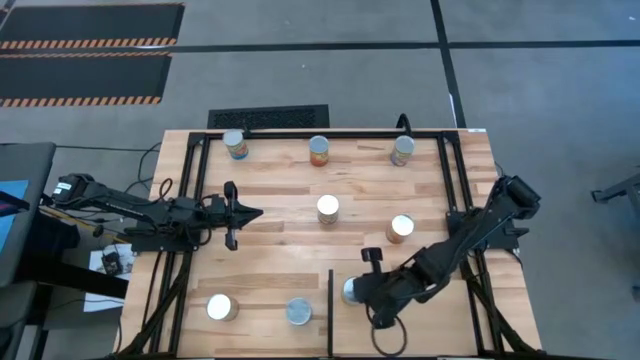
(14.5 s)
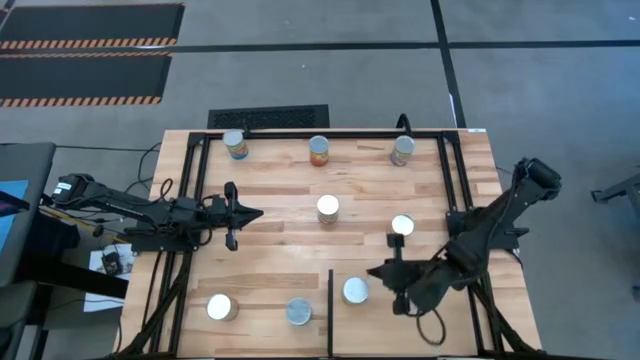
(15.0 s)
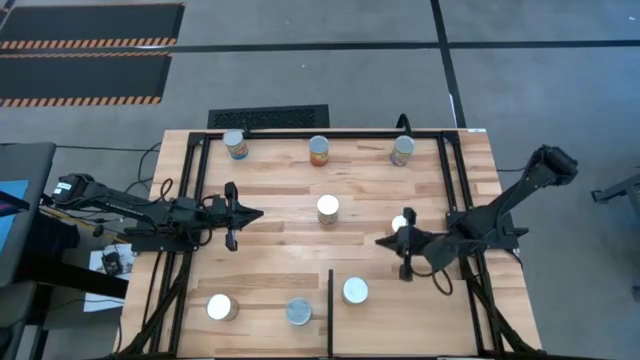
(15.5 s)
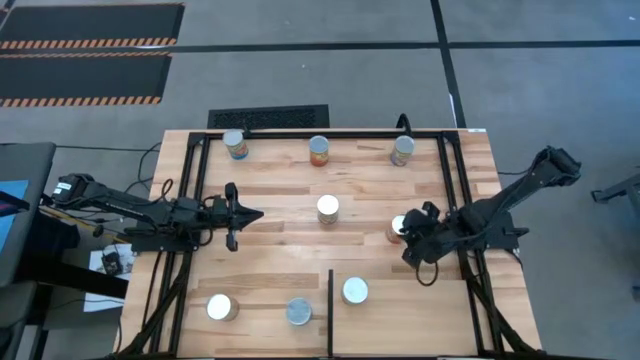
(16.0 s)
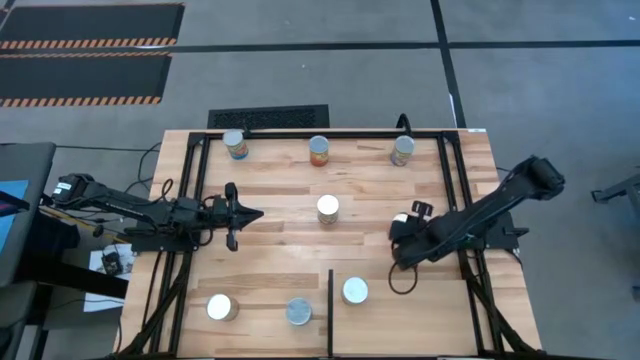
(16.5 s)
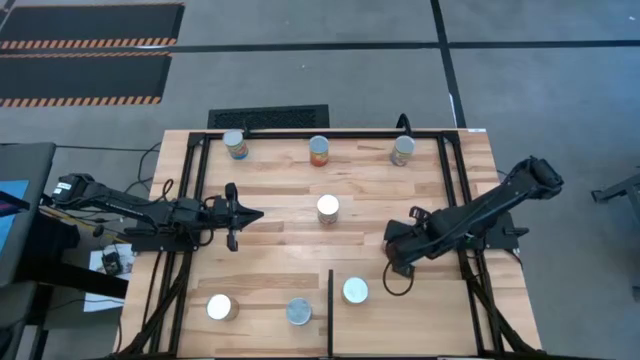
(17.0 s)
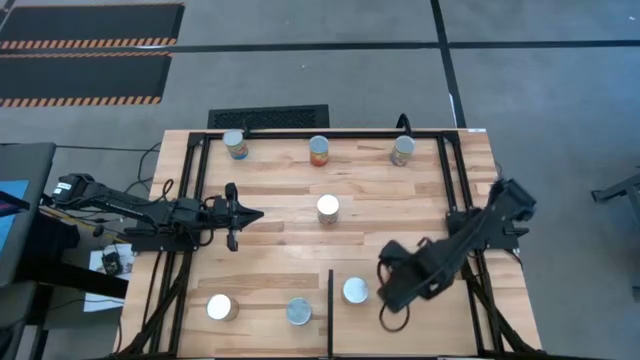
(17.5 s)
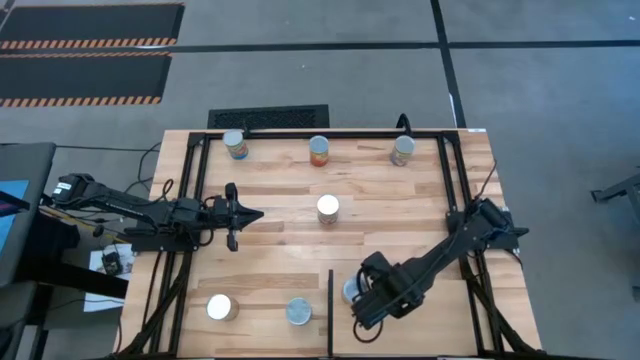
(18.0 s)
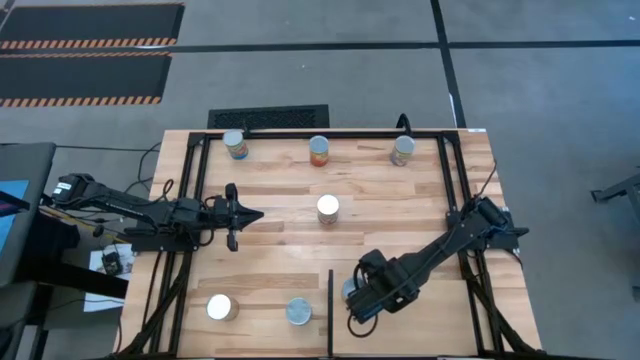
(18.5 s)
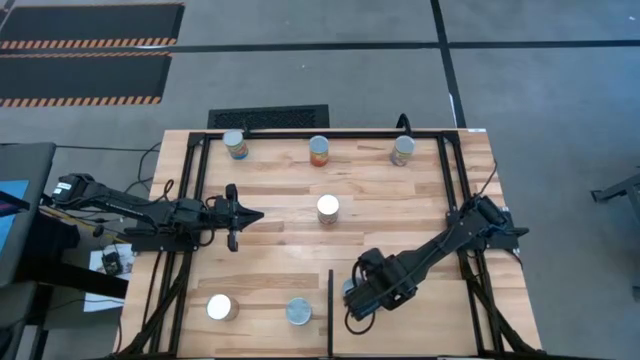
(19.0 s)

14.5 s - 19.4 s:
Task: Pick and place cans onto a shelf
Put the bottom canned corn on the shelf

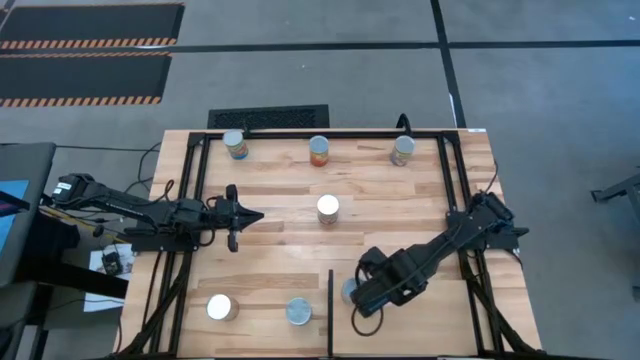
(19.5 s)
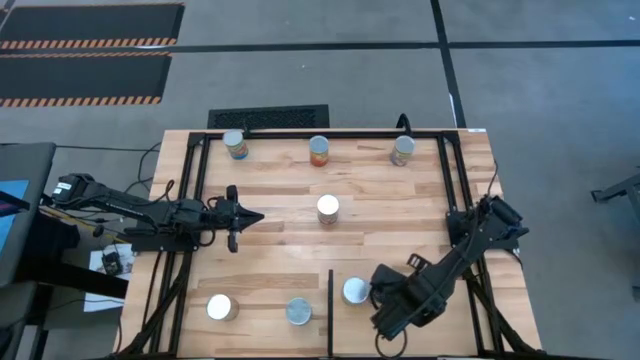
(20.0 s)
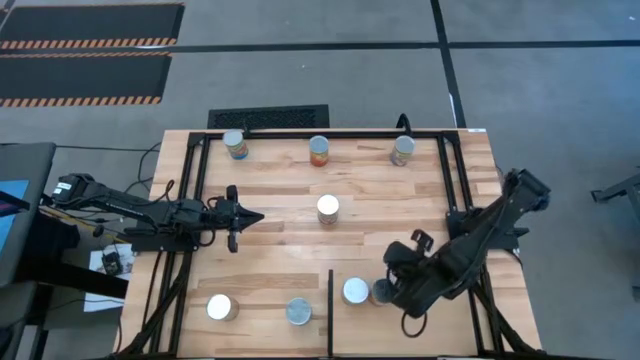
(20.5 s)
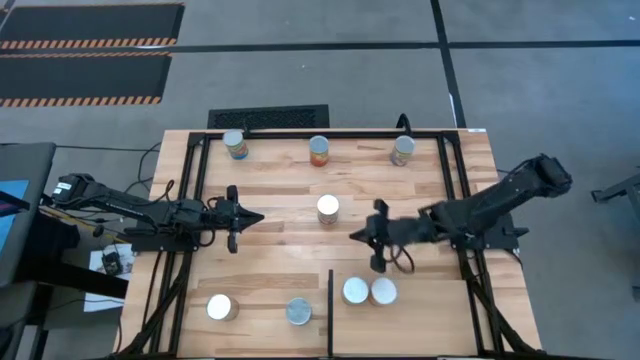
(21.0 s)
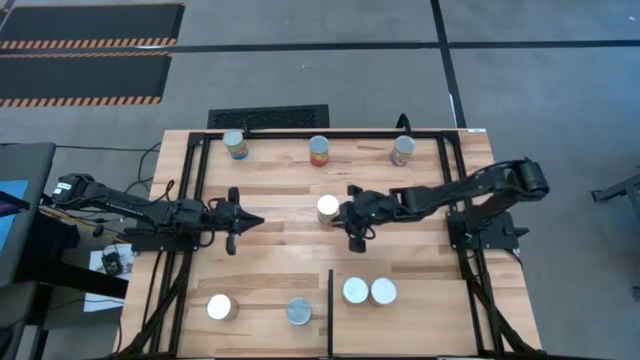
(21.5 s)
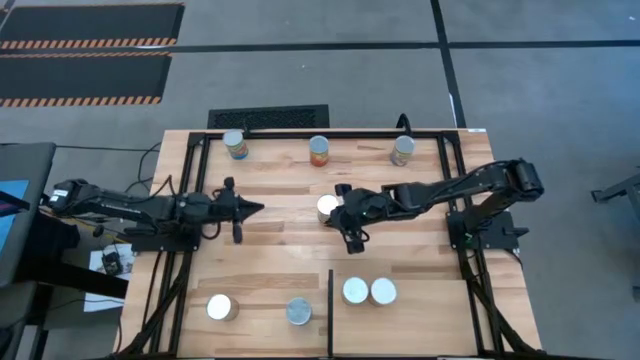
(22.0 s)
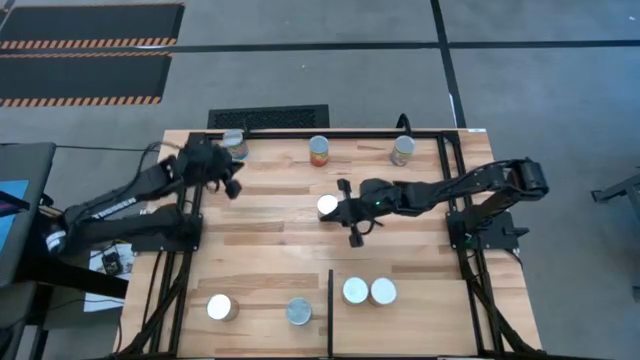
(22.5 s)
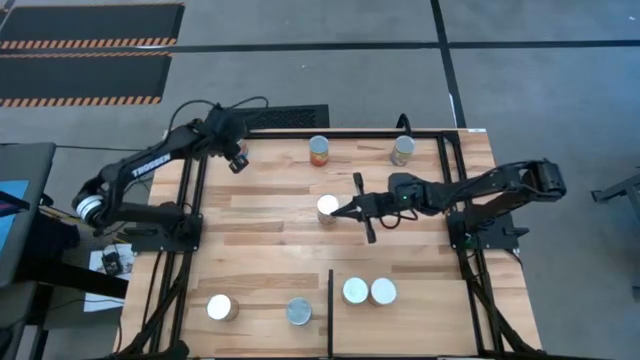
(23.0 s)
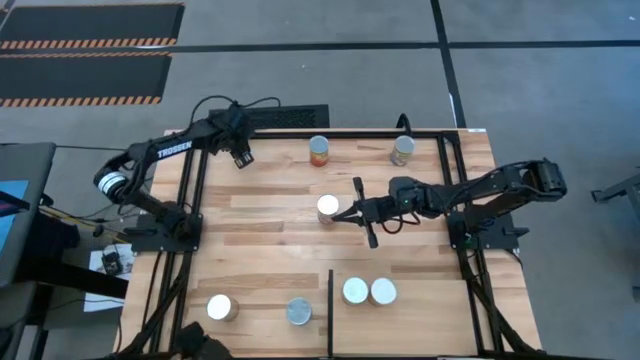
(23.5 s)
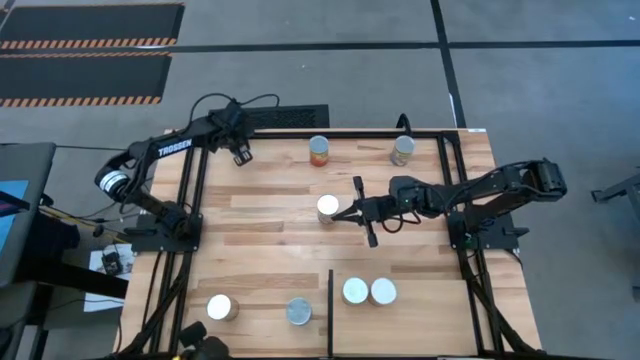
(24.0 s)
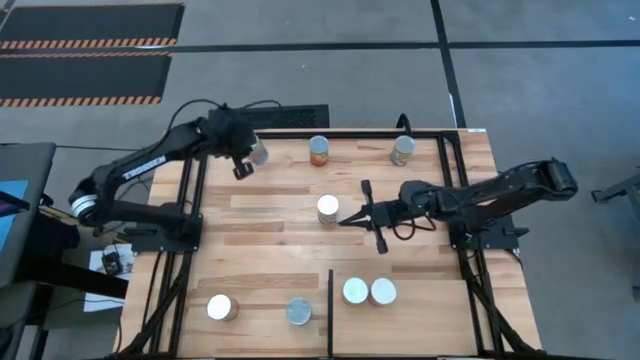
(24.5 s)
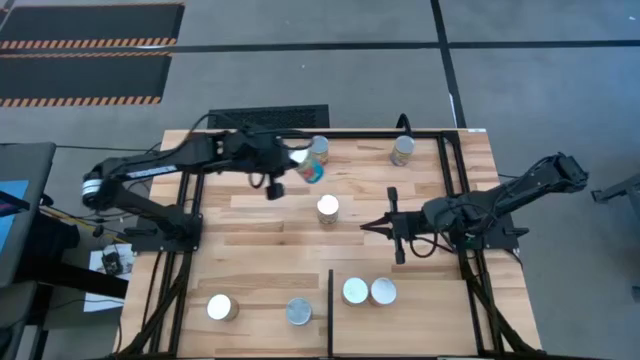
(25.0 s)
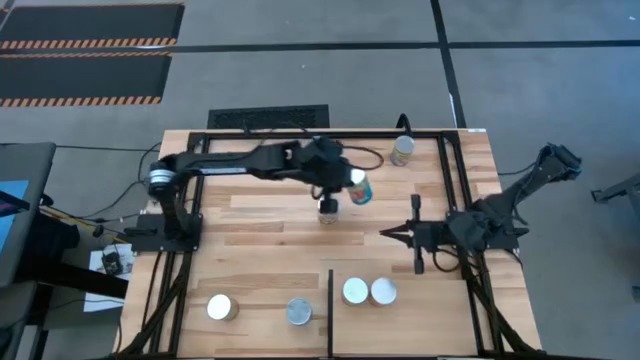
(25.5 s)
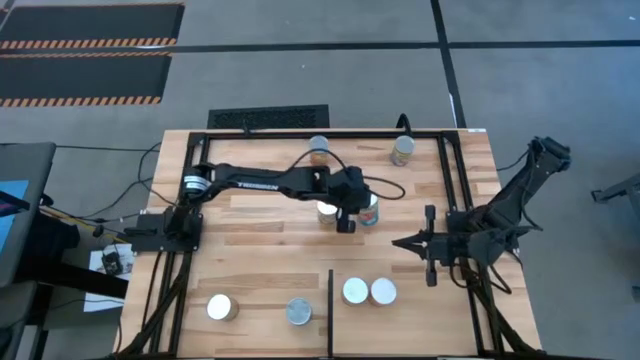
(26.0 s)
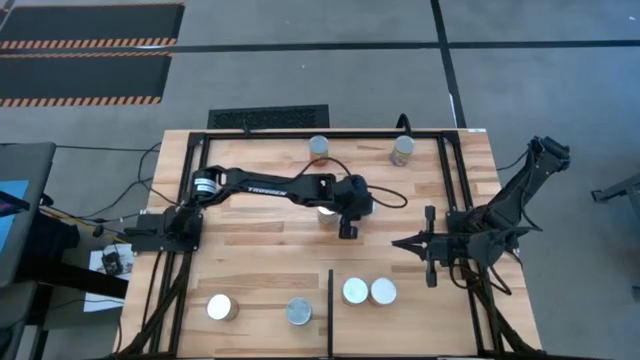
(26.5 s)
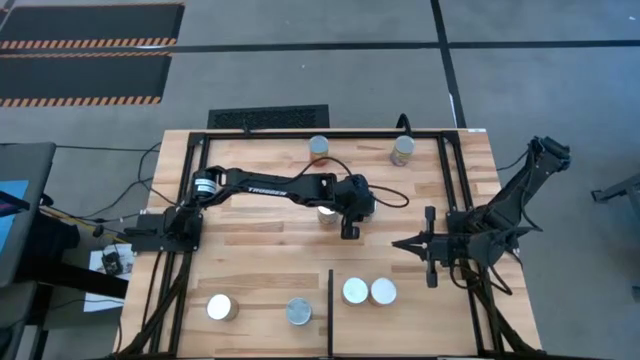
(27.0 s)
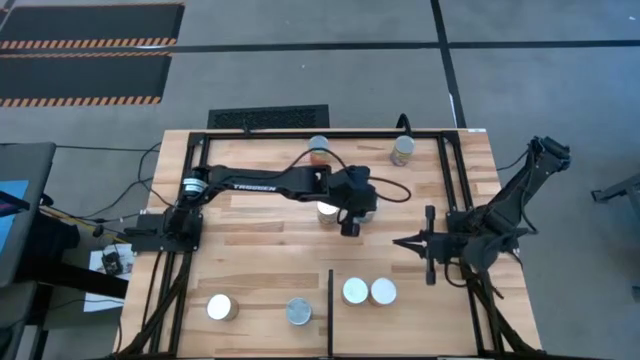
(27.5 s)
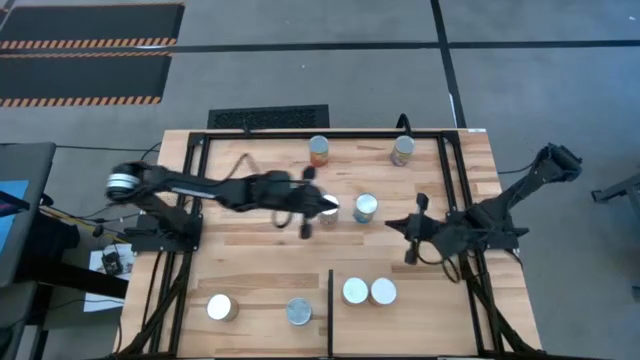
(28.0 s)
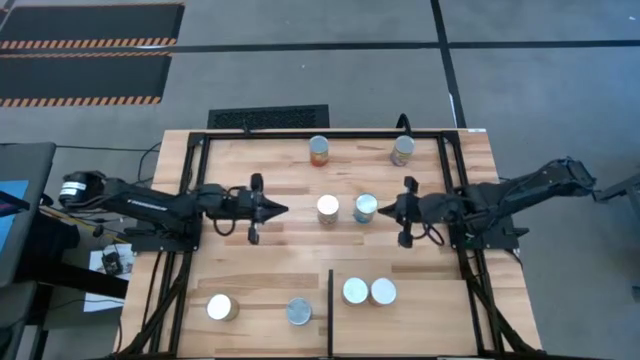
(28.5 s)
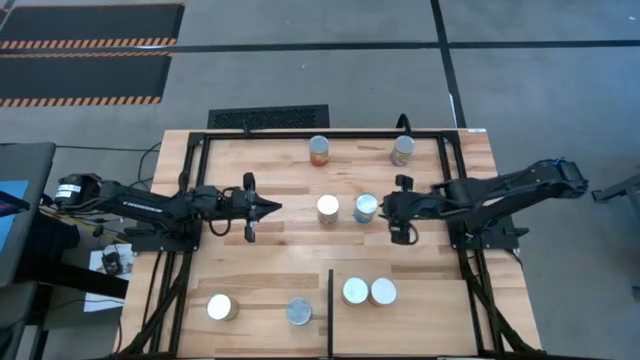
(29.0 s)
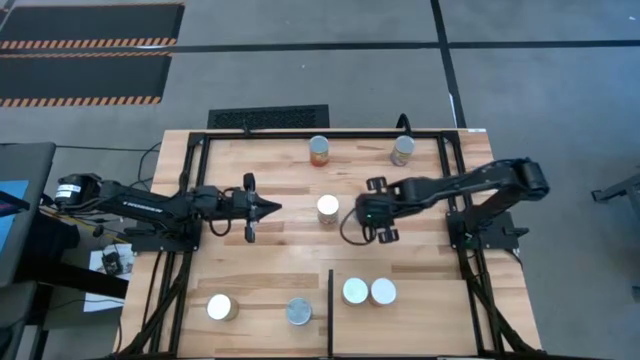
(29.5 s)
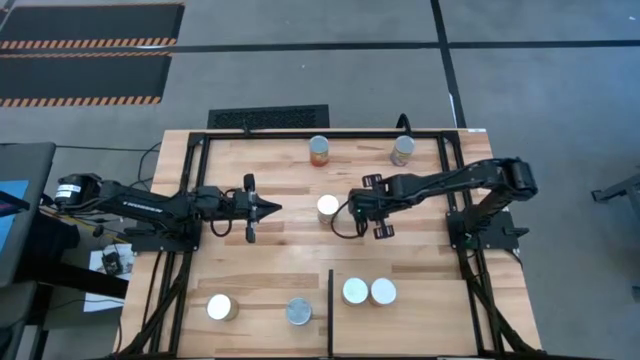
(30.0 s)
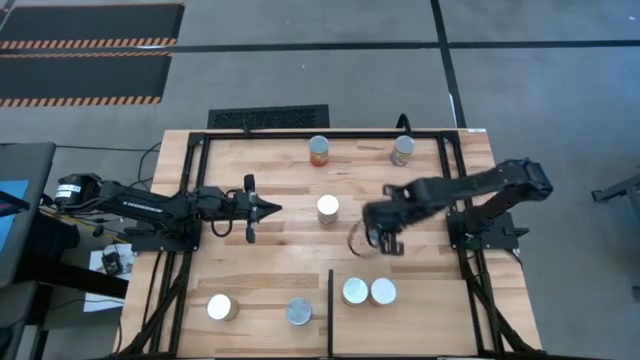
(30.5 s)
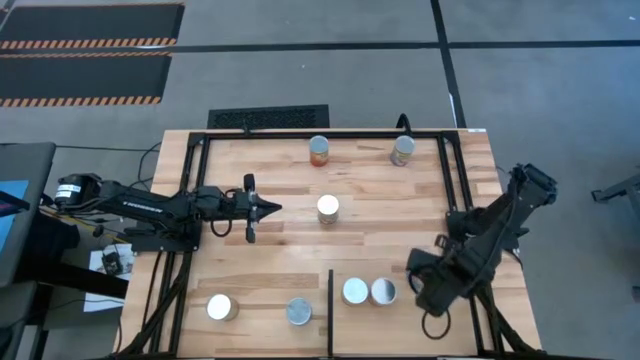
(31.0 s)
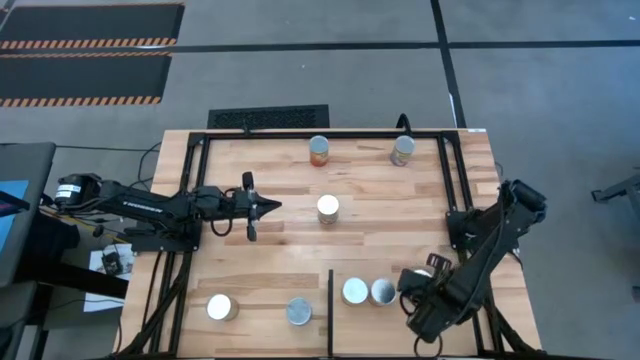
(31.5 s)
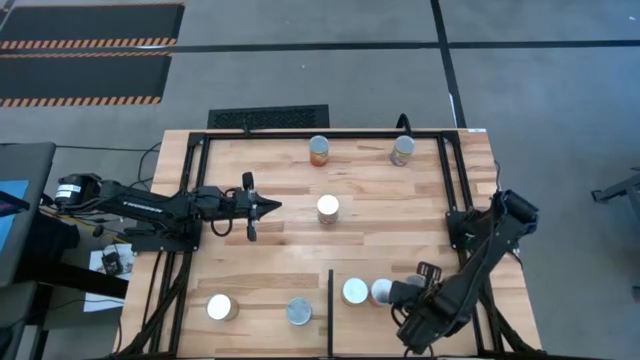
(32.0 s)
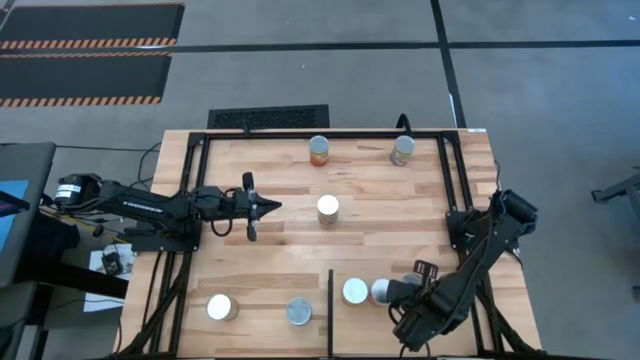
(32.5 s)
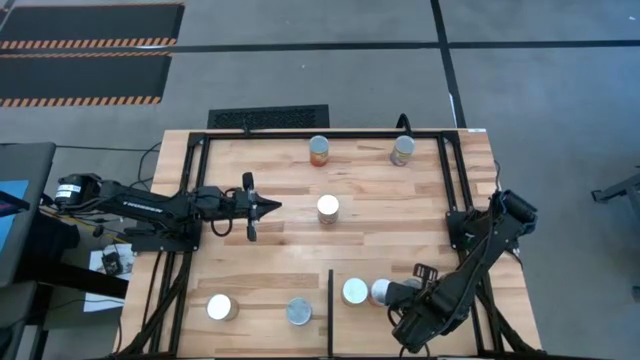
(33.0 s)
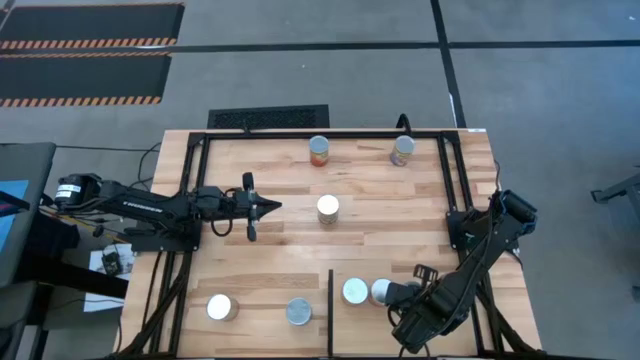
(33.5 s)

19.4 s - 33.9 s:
Put the top canned tomatoes on the shelf

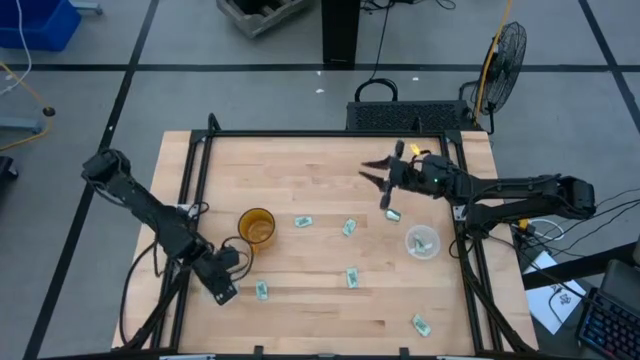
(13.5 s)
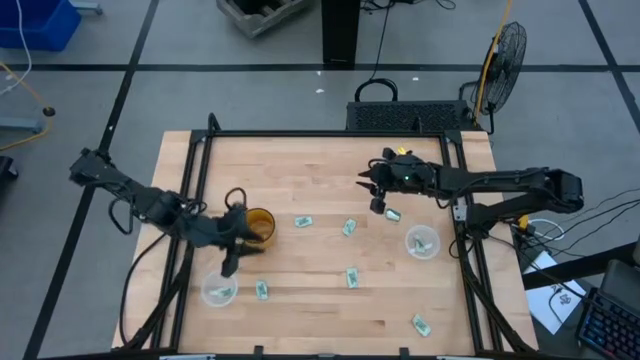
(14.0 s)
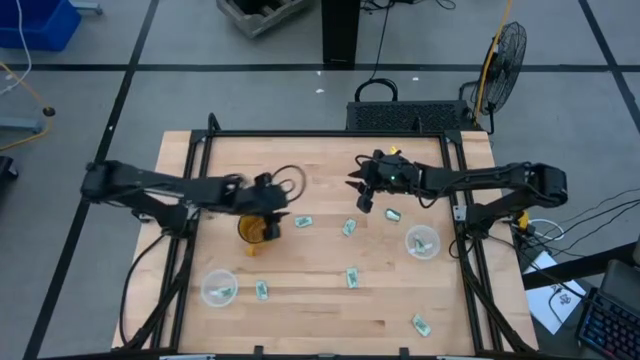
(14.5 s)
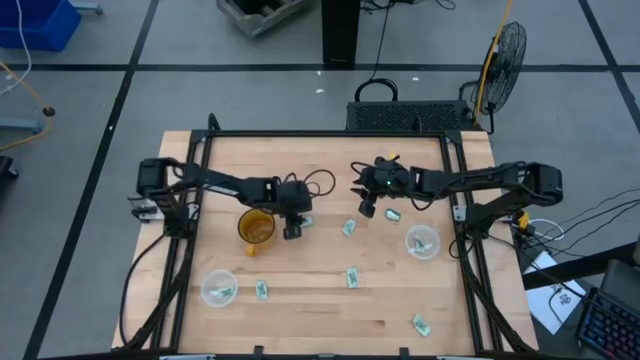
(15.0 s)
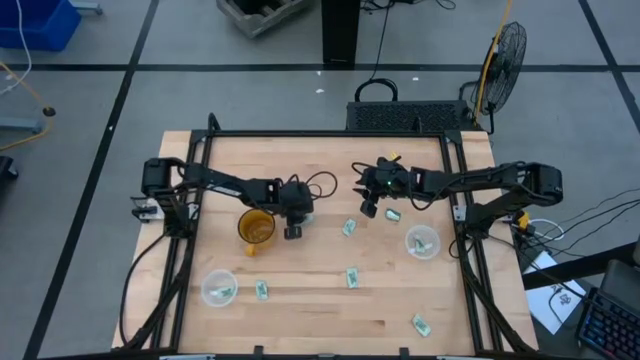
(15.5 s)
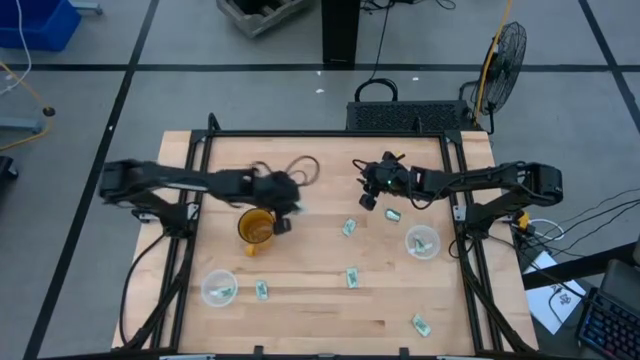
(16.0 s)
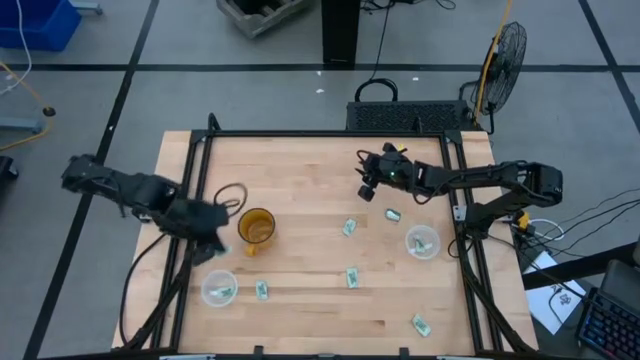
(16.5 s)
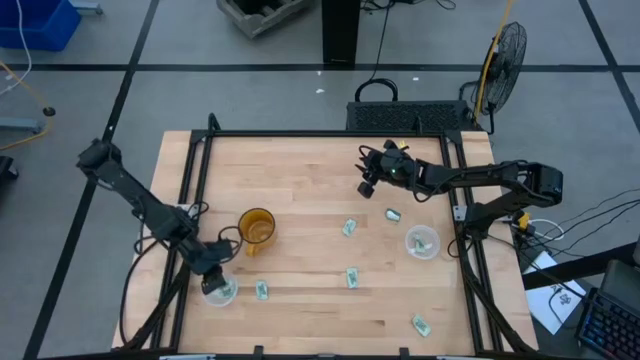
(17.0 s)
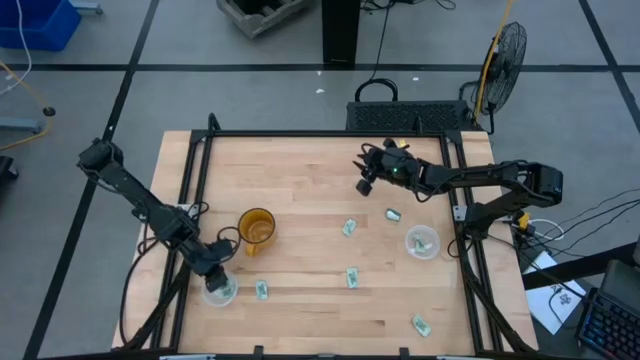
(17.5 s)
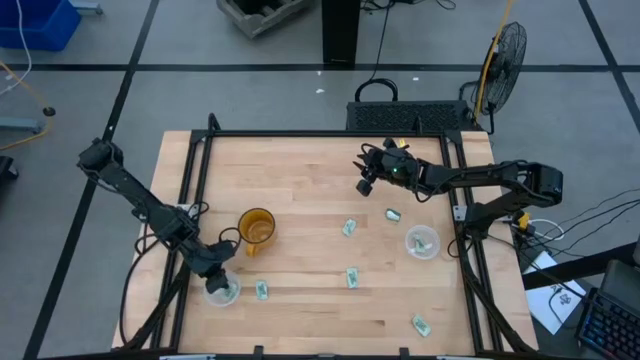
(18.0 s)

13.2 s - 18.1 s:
Task: Pick and place Stevia / Truvia into bins
Put the stevia packet into the left transparent container
